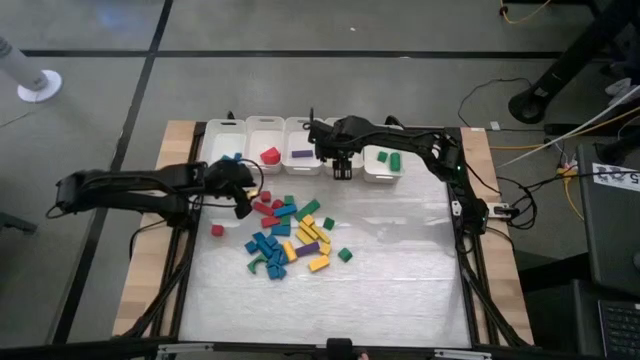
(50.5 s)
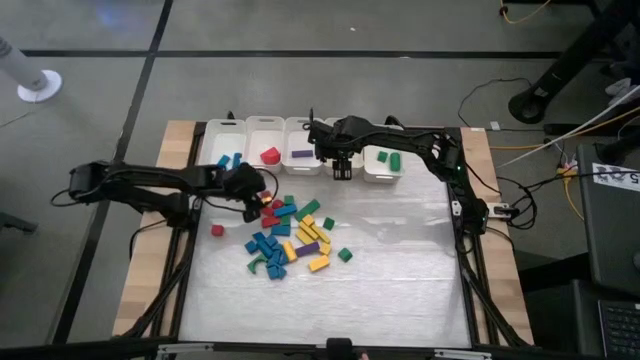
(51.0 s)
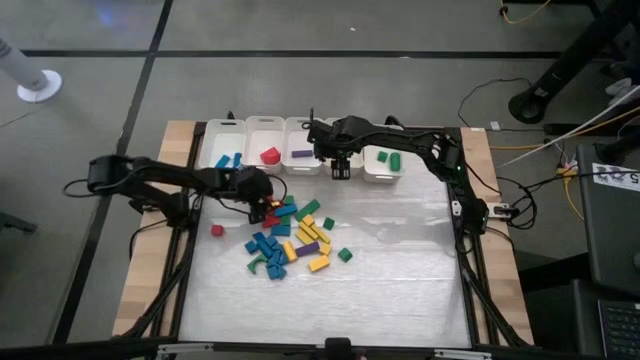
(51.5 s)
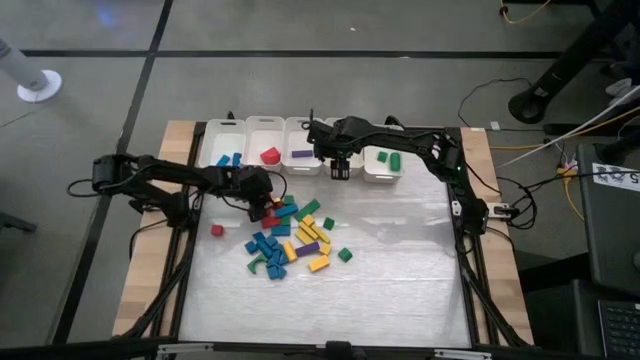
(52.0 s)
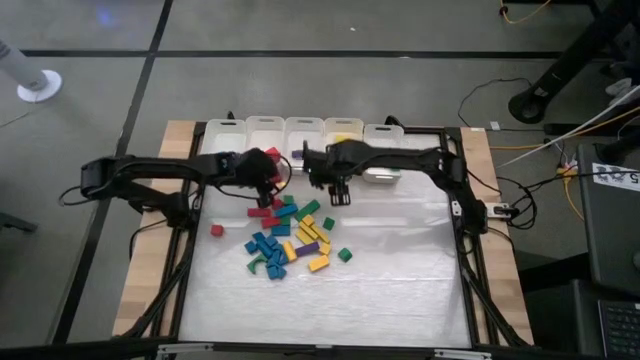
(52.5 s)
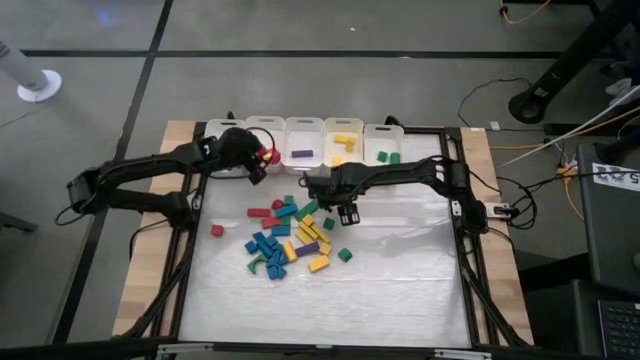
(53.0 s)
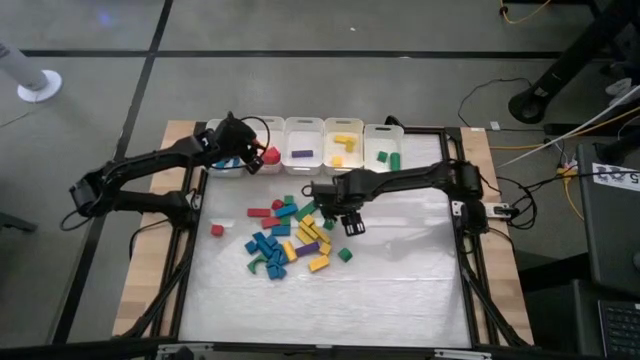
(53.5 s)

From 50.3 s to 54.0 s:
Task: Sort blocks
Put the red block into the middle left white bin

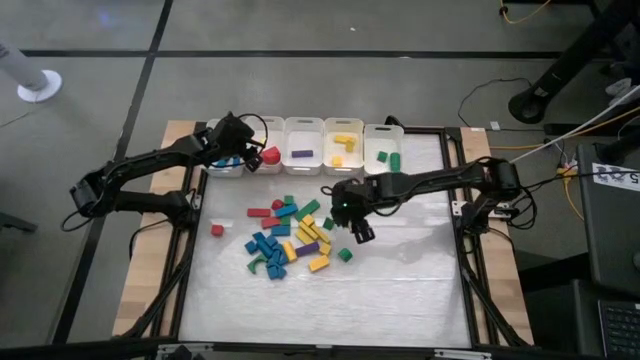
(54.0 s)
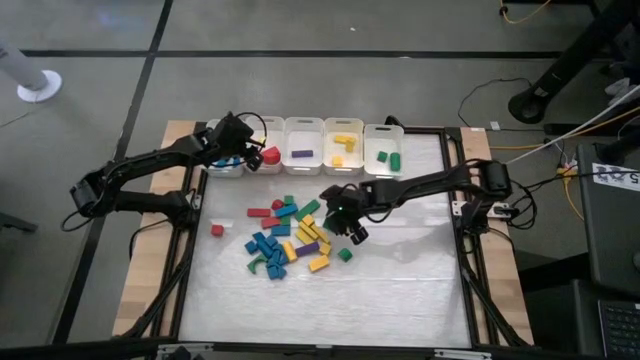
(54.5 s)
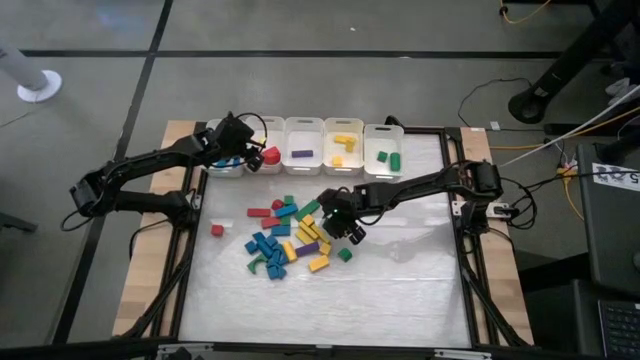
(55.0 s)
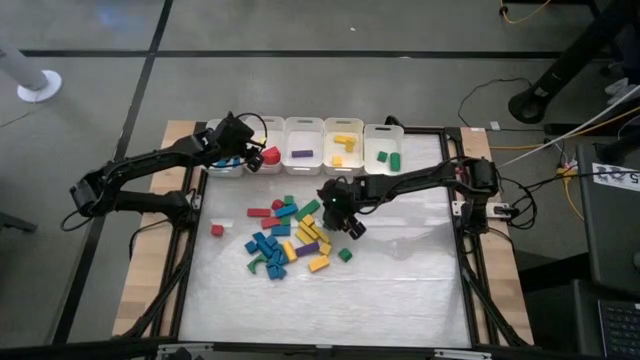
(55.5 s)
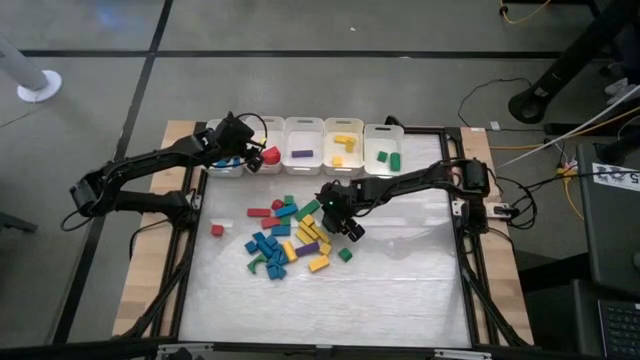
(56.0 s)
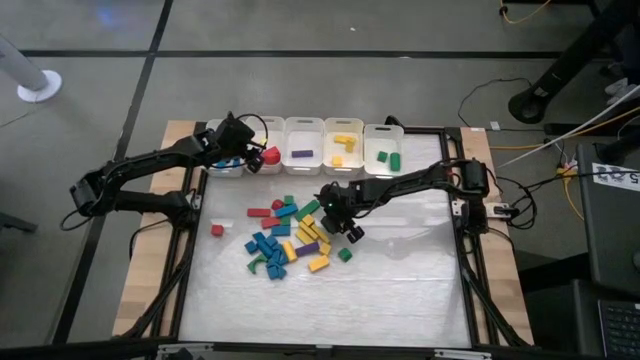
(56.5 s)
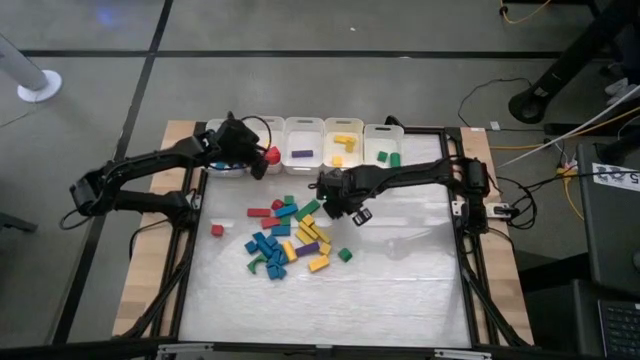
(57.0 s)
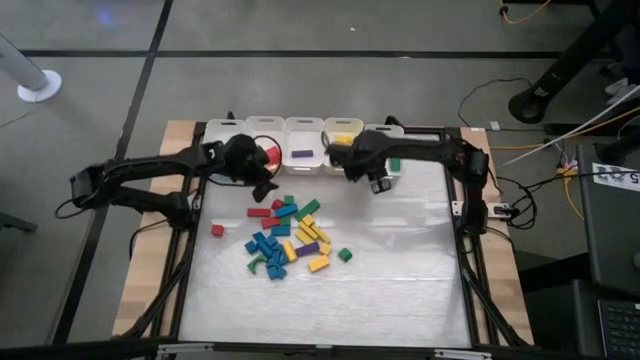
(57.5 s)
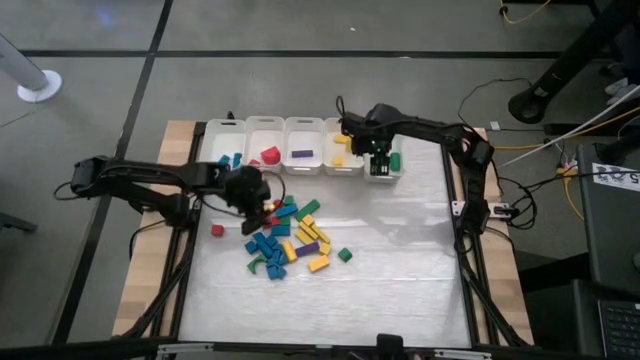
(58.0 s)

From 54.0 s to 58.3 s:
Put the green block into the right white bin

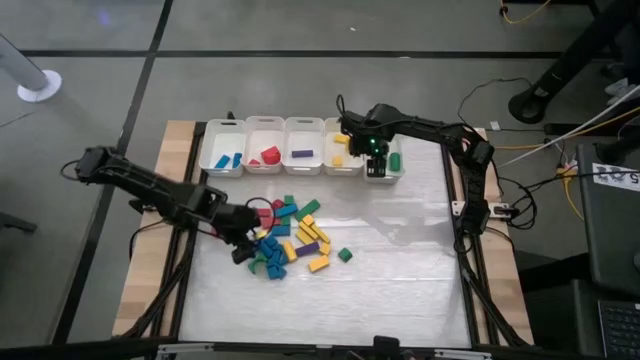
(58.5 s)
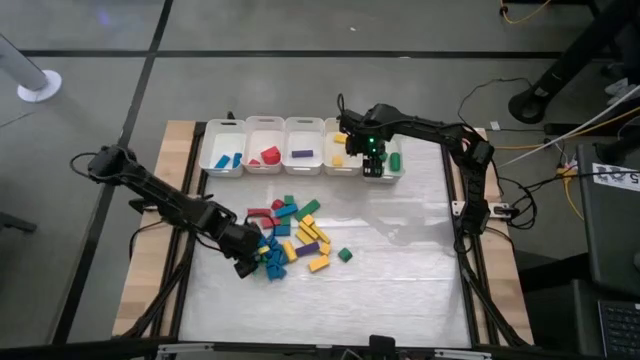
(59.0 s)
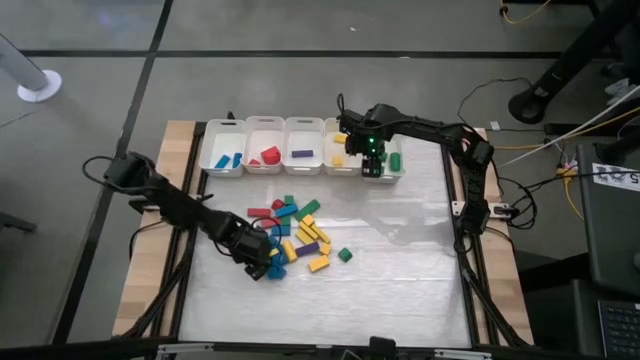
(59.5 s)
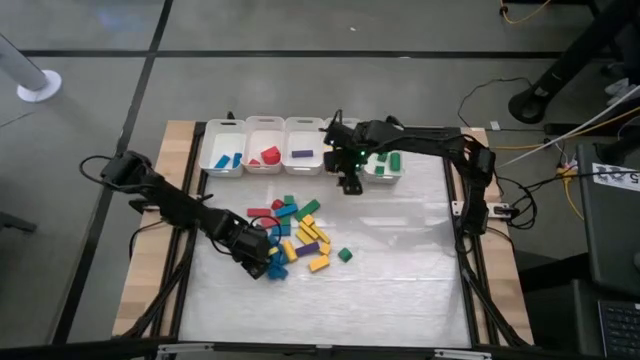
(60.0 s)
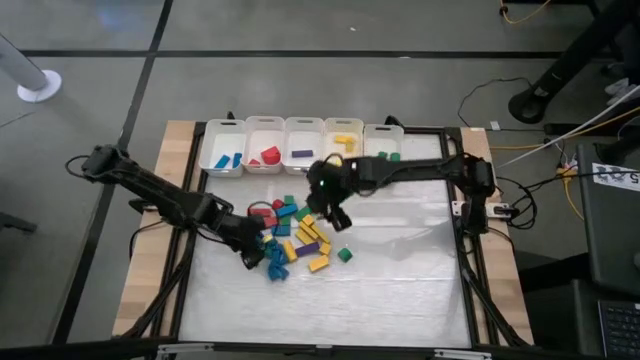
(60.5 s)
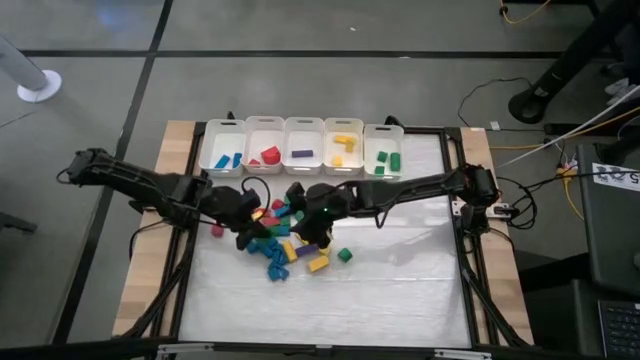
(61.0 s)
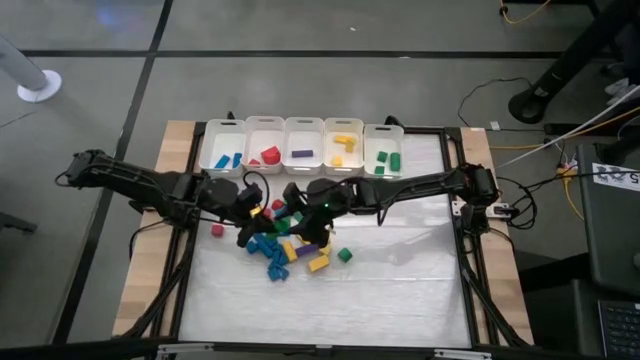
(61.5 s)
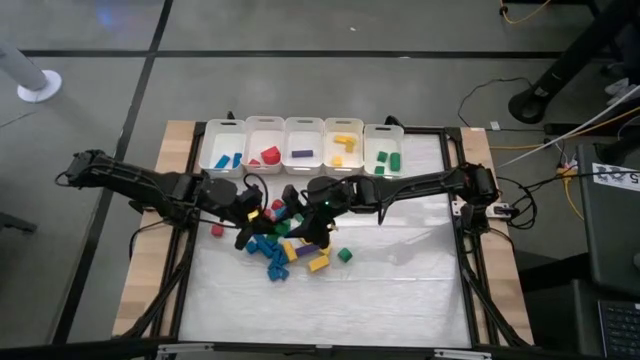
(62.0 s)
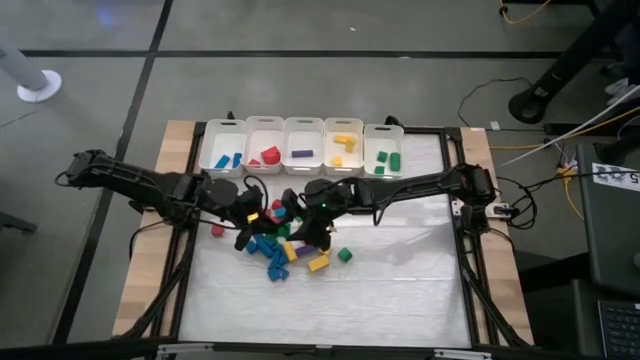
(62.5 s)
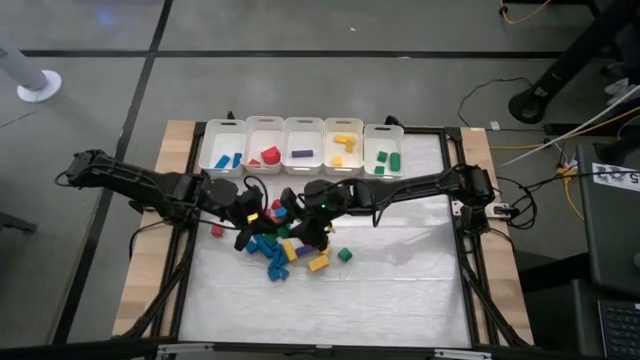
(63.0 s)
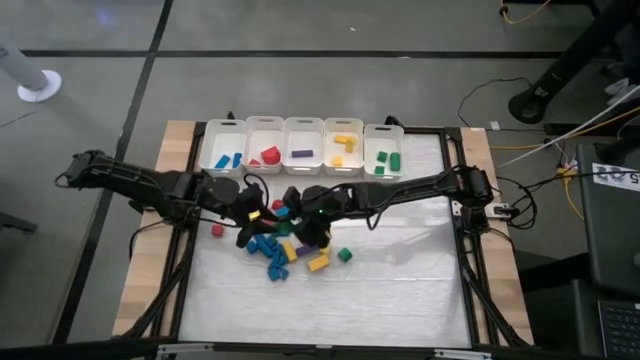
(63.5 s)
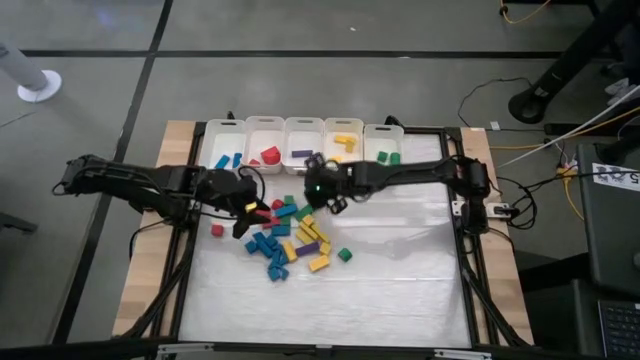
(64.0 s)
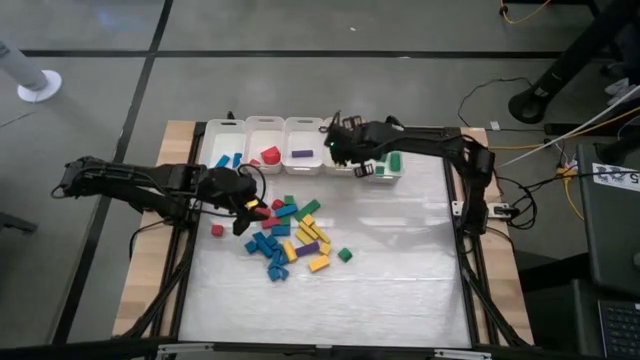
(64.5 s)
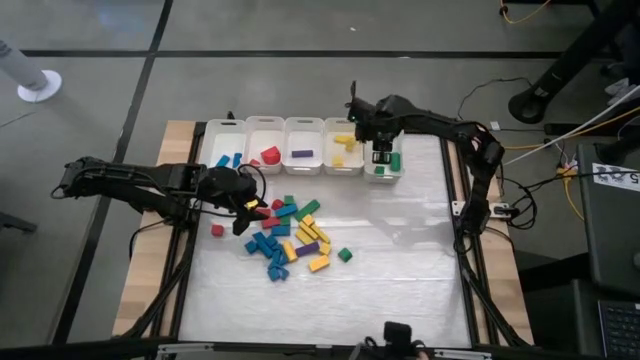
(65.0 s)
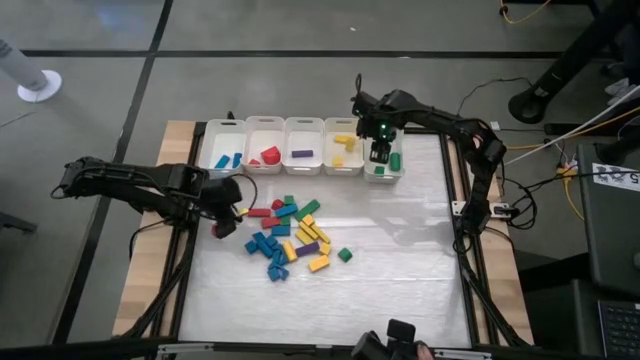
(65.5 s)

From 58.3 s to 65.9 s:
Put the green block into the right white bin

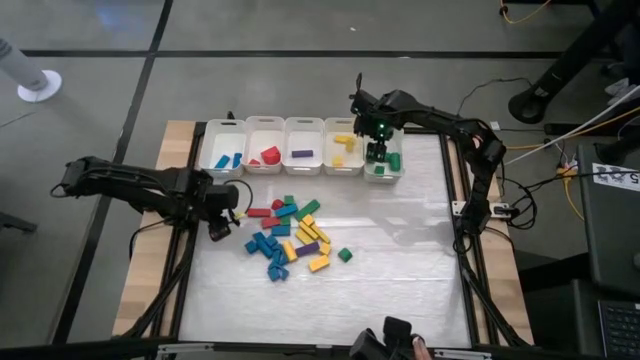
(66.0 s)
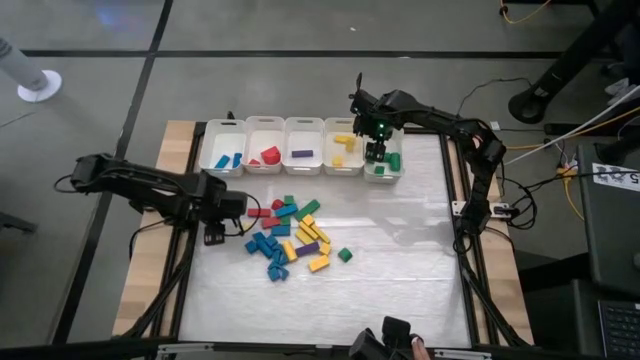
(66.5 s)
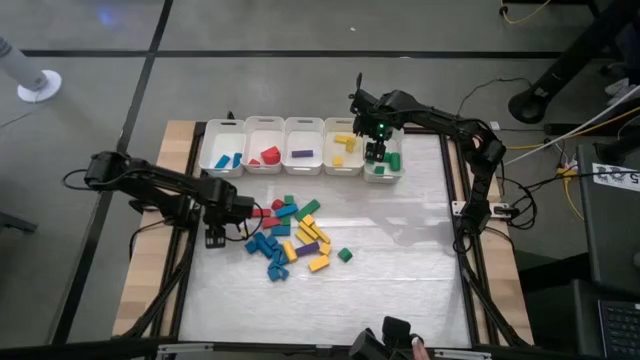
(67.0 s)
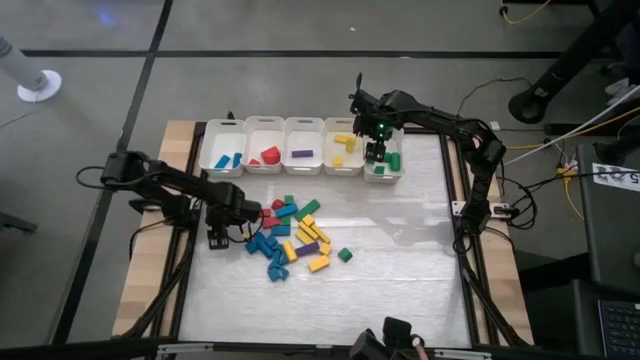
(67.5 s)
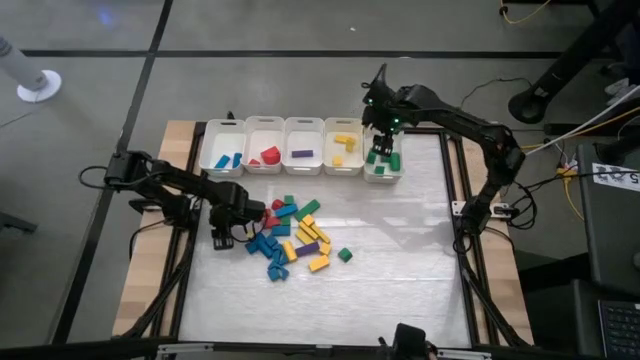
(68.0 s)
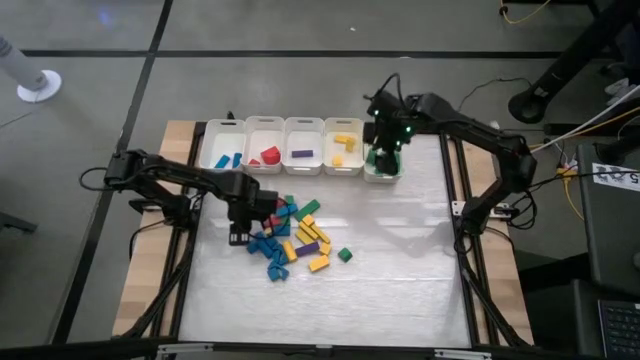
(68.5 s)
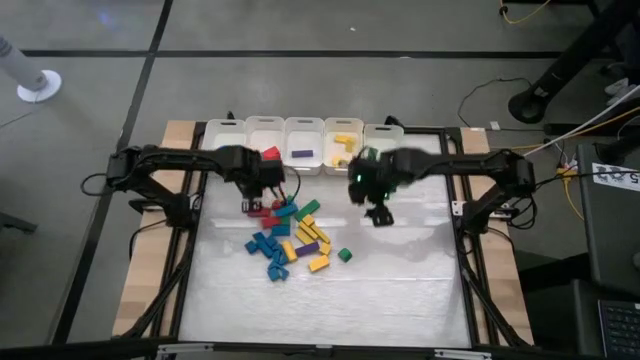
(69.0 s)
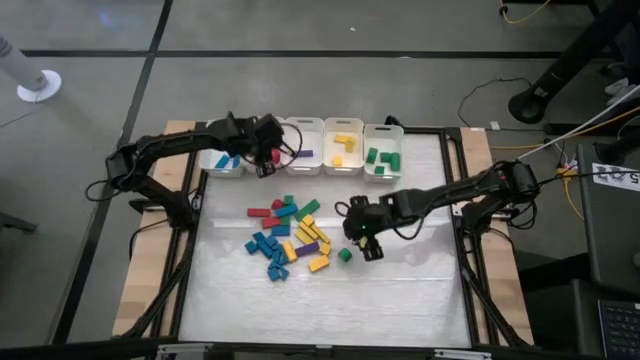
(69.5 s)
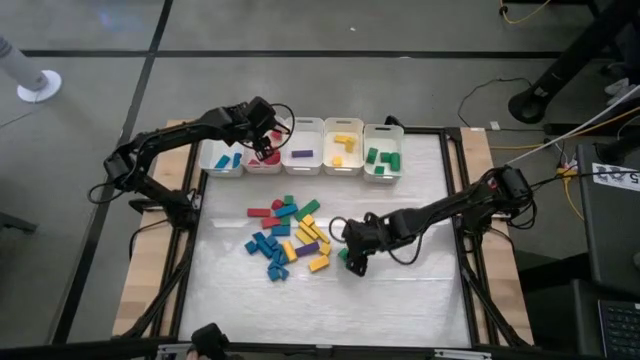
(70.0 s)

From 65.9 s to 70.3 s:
Put the red block into the middle left white bin

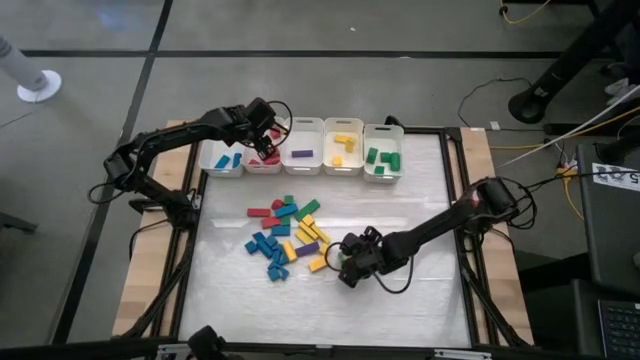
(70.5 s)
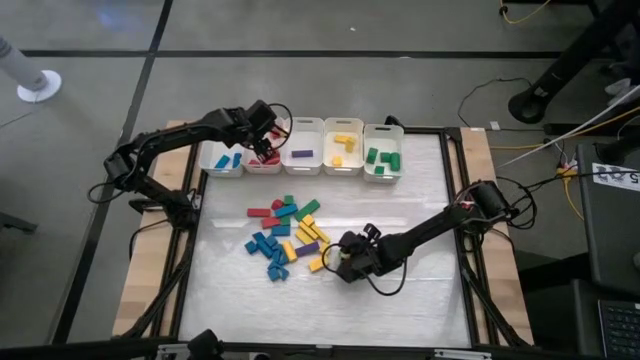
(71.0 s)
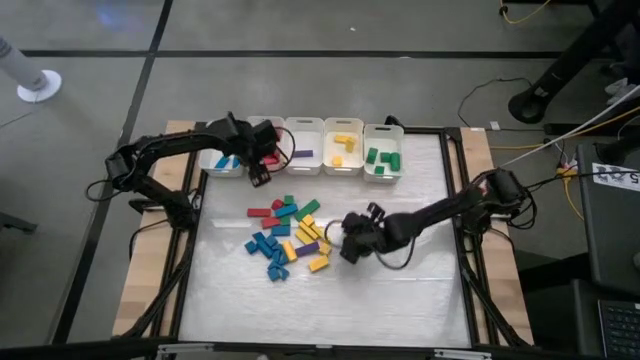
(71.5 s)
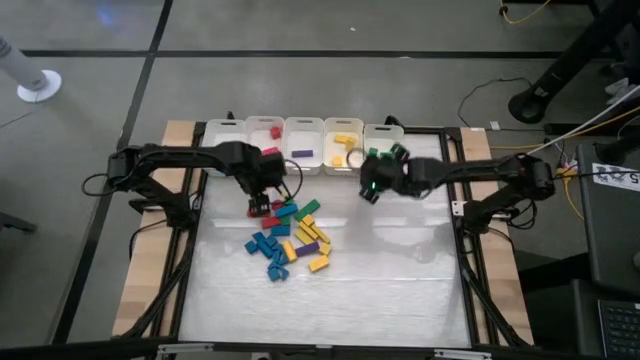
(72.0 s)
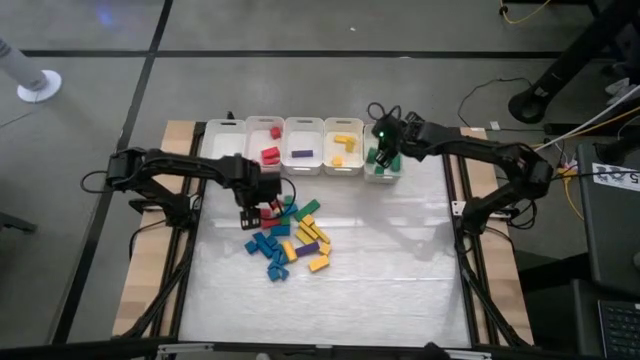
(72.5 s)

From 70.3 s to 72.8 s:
Put the green block into the right white bin
